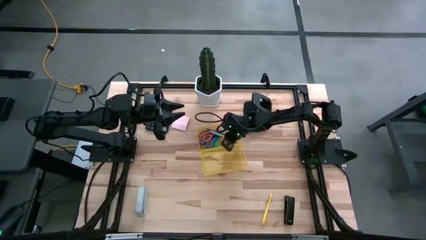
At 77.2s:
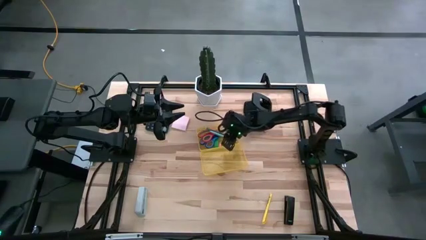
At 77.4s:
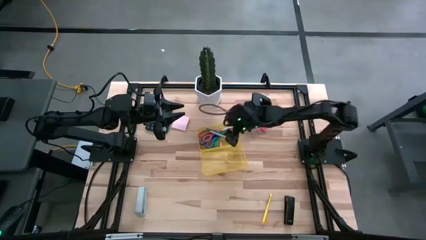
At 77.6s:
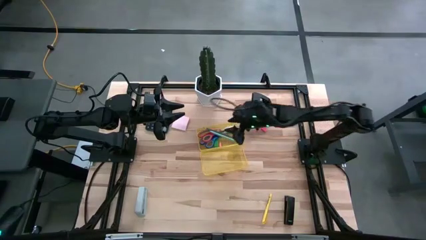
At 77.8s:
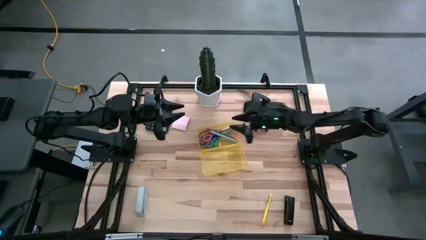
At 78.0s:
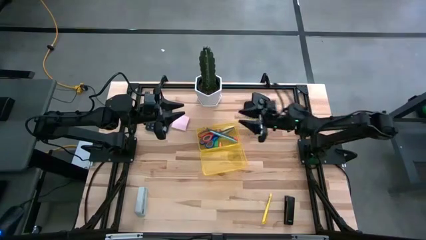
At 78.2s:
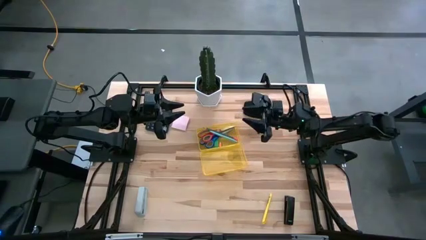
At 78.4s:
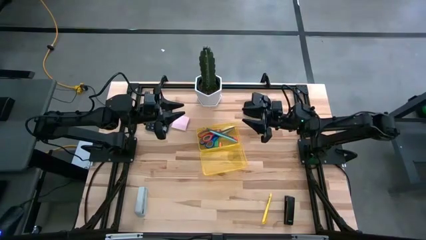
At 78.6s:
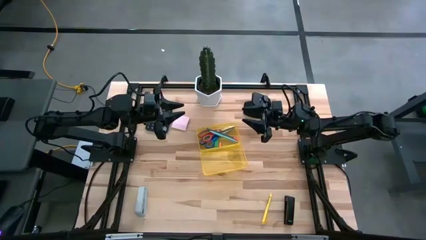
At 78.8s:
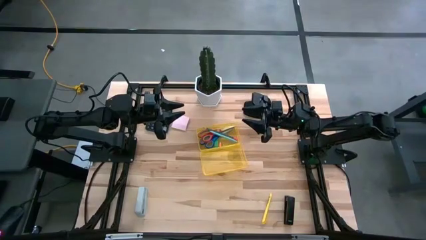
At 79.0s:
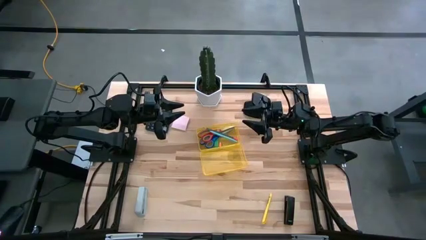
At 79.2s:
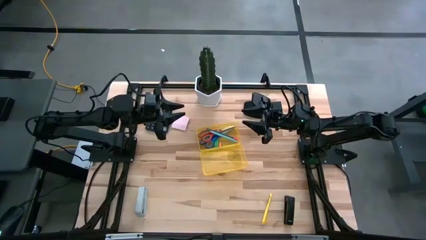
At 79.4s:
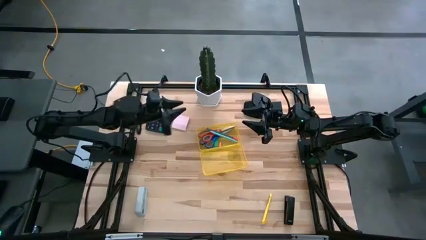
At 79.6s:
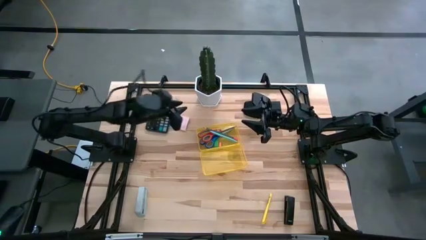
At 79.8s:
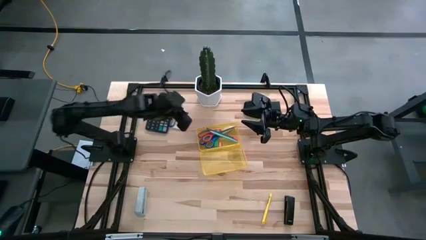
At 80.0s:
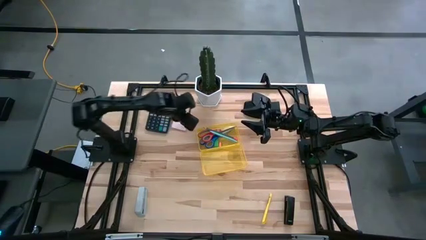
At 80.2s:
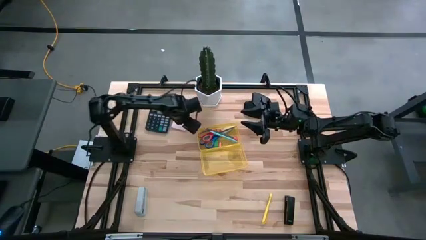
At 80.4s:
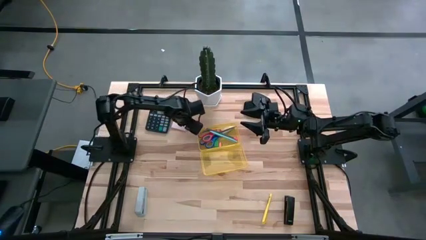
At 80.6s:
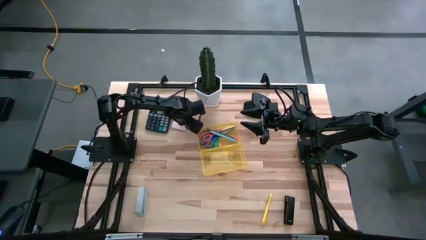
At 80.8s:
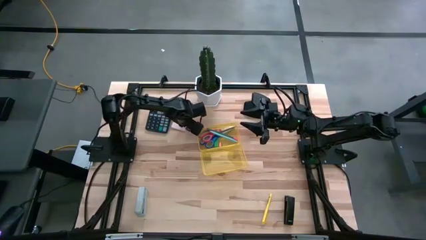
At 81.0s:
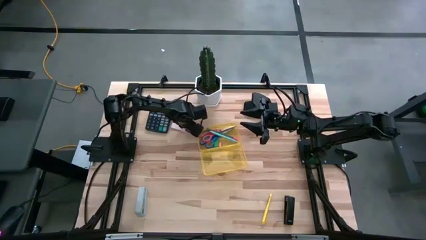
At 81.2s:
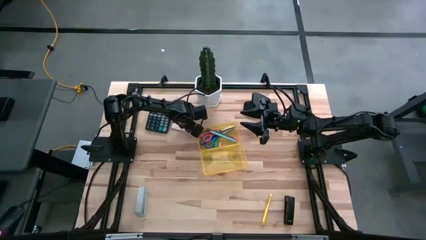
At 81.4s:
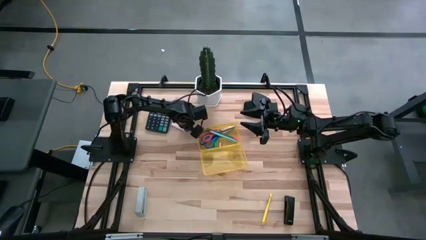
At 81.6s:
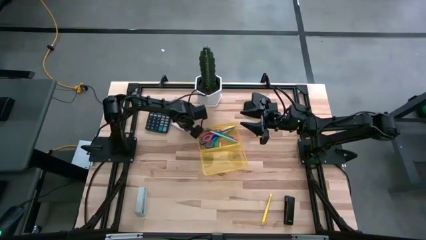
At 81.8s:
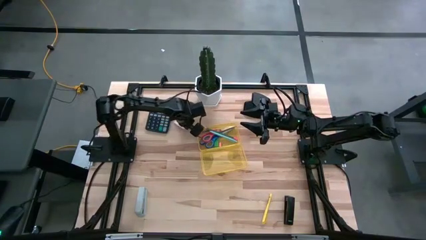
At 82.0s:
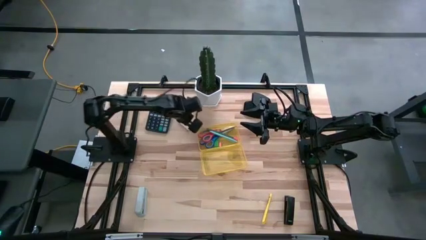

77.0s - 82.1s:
Task: Pack school essentials
Put the pink sticky notes into the yellow supply box

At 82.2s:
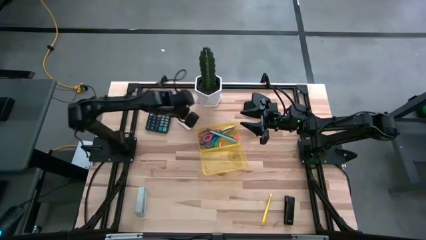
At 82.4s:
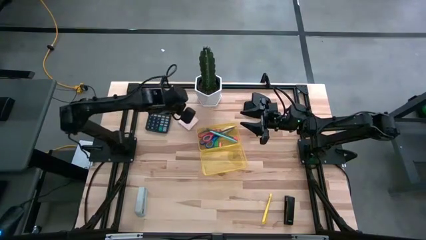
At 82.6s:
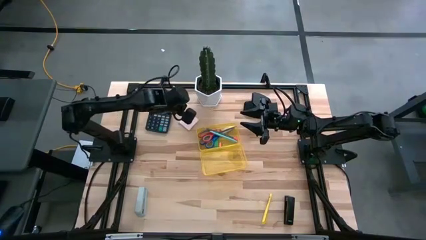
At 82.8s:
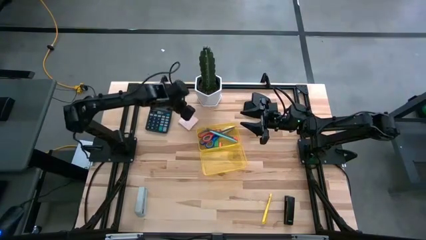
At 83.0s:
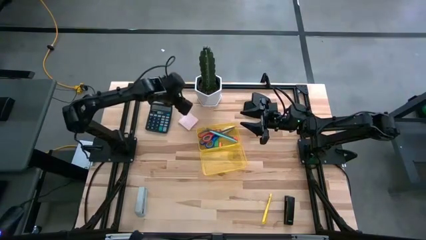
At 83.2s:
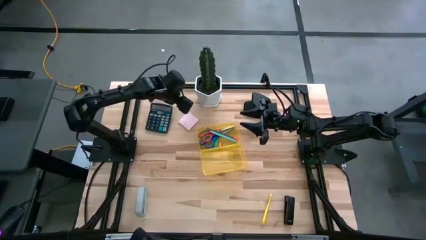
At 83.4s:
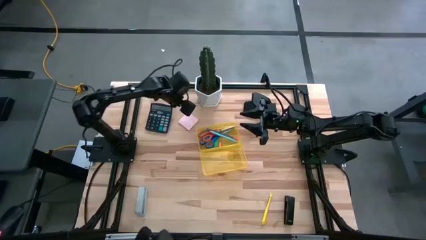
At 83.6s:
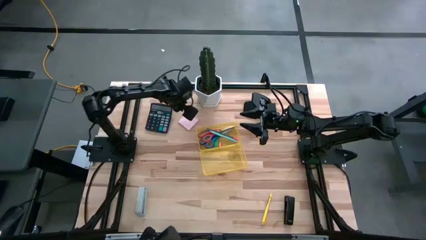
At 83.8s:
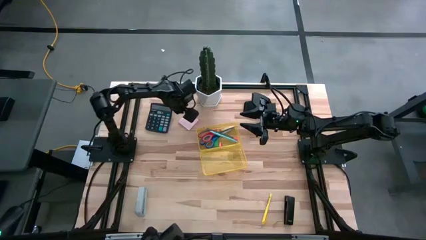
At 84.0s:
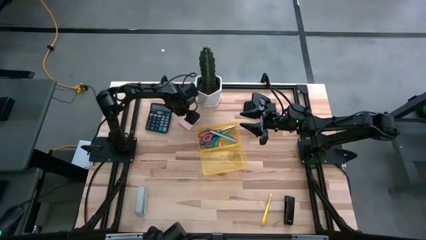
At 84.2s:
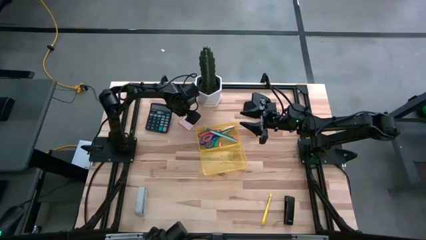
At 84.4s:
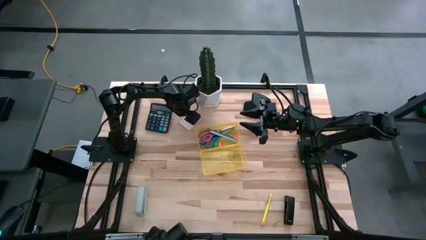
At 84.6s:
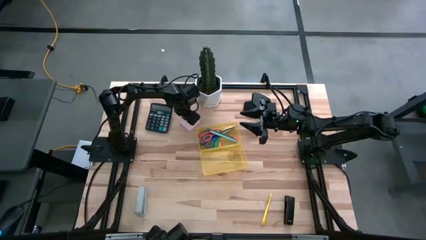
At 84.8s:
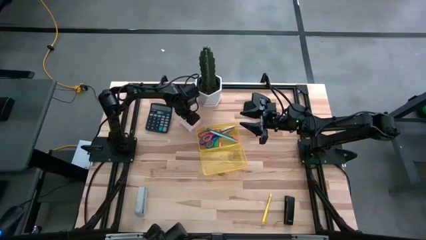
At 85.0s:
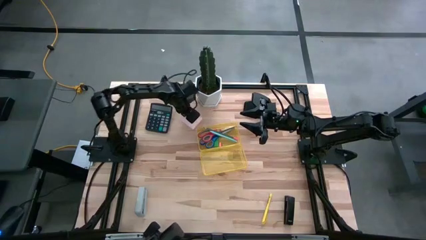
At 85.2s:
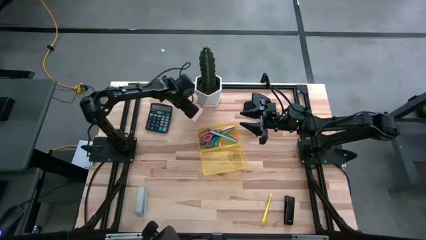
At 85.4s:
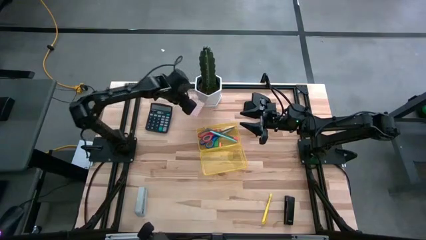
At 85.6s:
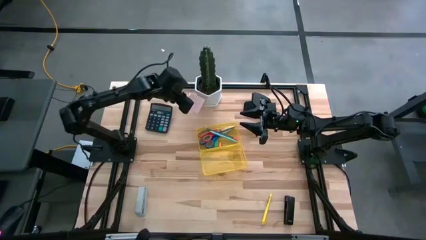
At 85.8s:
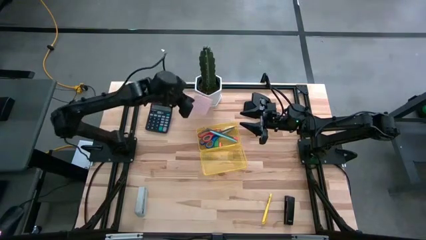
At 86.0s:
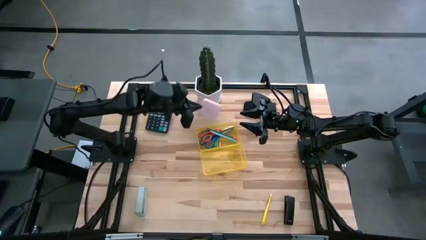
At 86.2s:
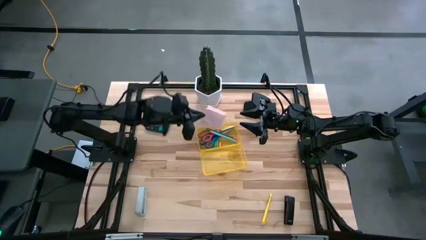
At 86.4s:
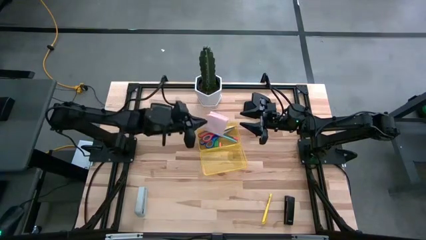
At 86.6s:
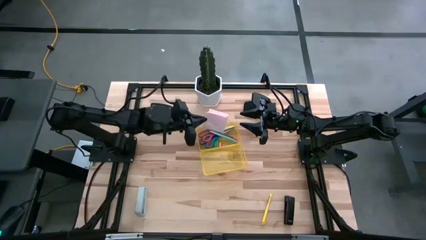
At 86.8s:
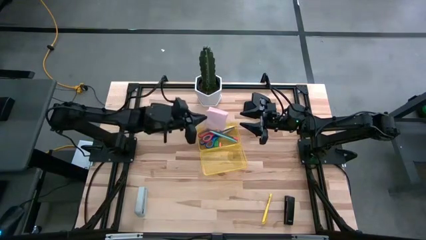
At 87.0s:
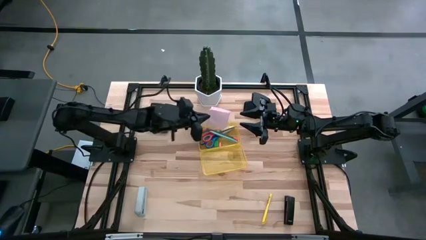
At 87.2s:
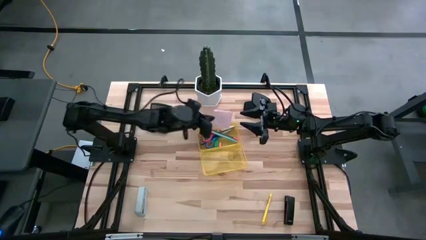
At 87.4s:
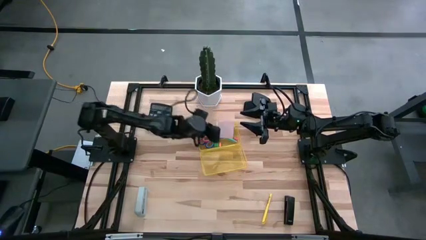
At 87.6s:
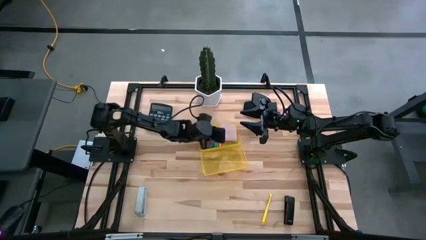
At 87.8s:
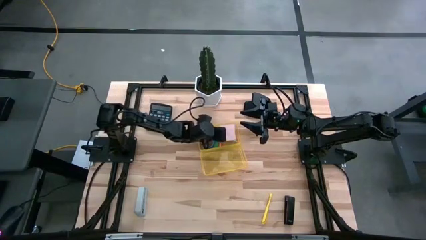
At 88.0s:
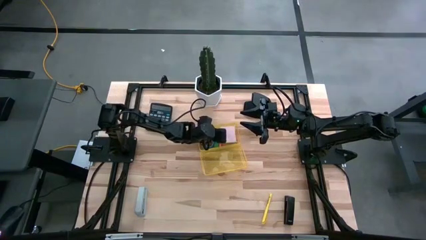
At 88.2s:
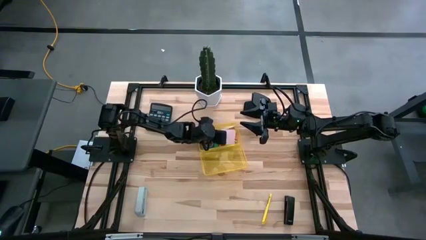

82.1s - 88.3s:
Put the pink sticky notes into the yellow supply box

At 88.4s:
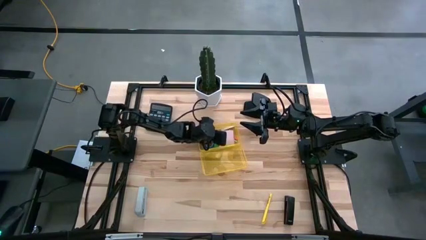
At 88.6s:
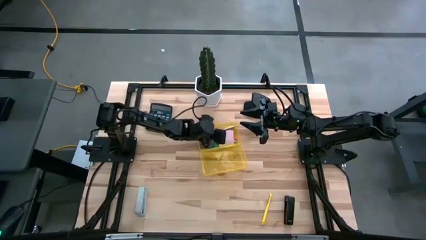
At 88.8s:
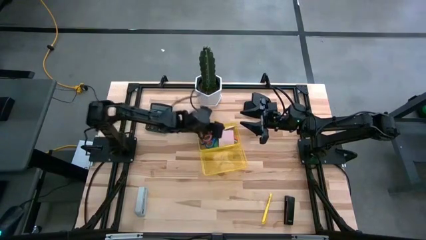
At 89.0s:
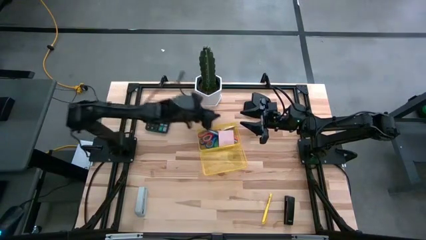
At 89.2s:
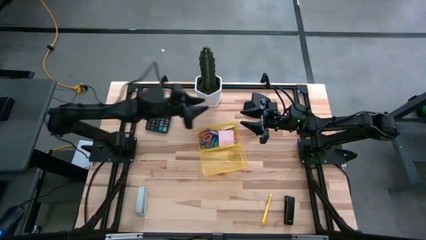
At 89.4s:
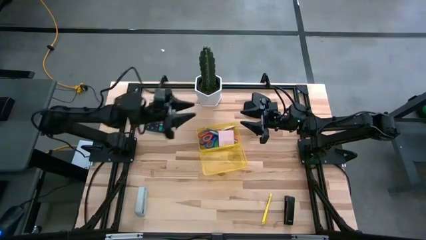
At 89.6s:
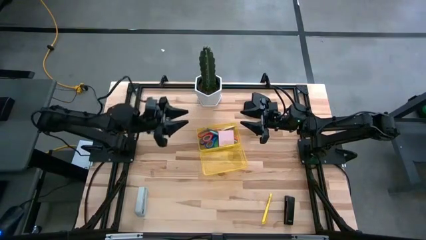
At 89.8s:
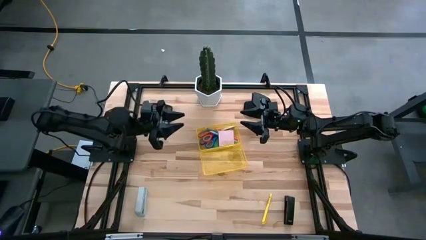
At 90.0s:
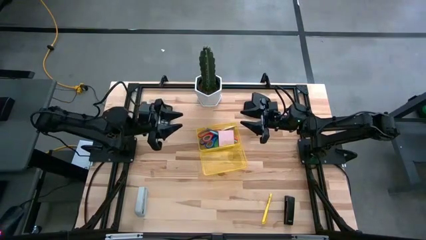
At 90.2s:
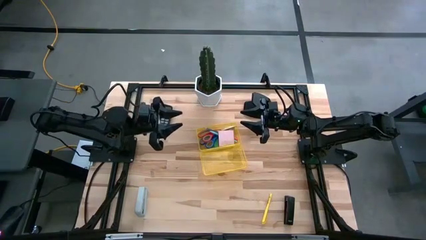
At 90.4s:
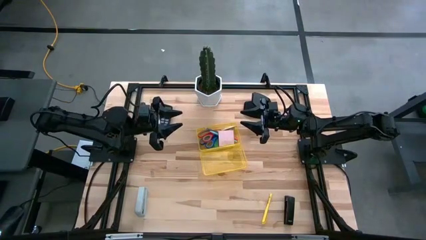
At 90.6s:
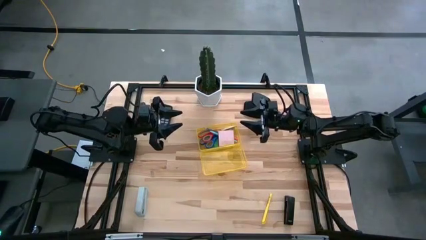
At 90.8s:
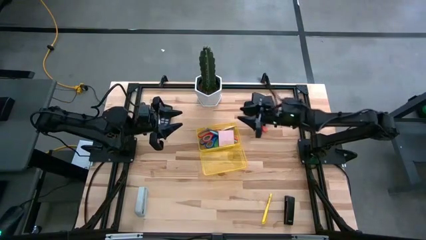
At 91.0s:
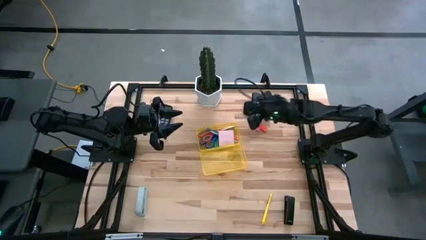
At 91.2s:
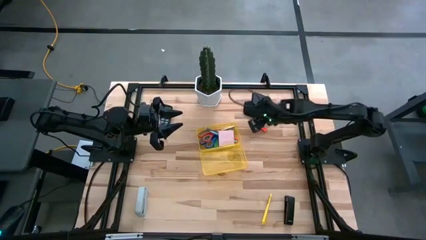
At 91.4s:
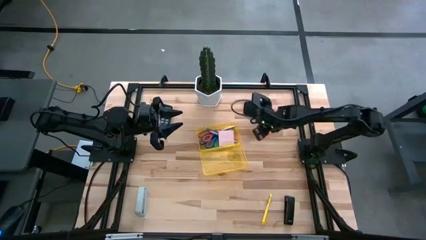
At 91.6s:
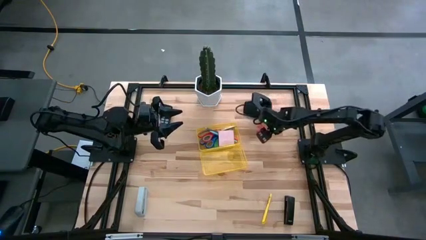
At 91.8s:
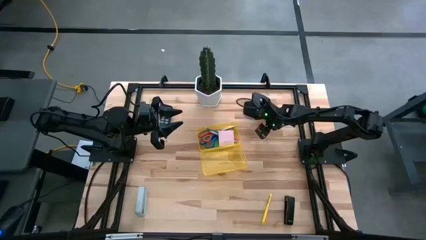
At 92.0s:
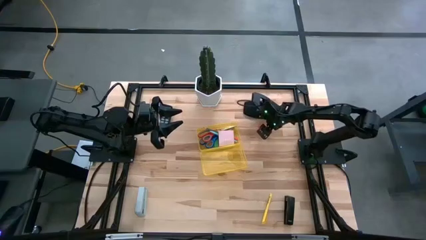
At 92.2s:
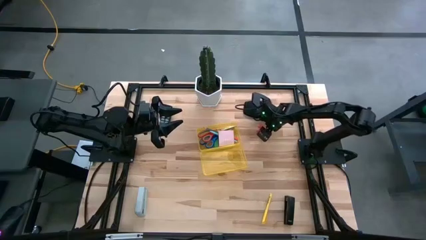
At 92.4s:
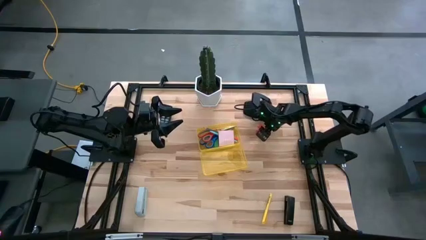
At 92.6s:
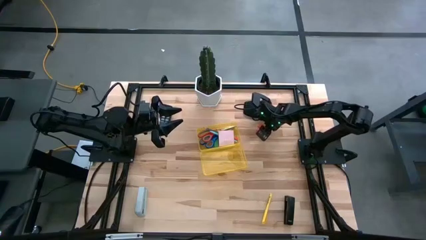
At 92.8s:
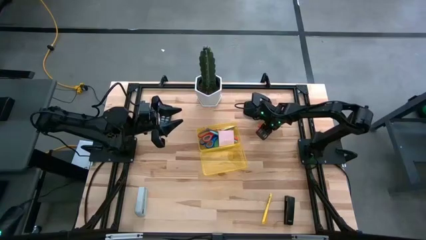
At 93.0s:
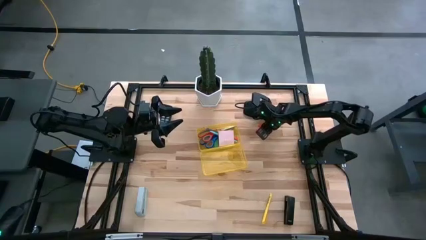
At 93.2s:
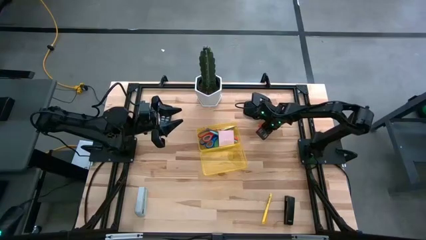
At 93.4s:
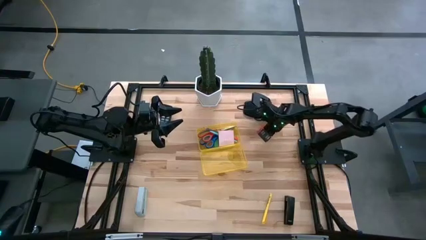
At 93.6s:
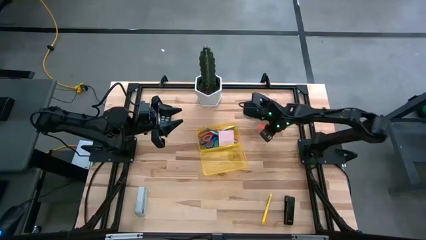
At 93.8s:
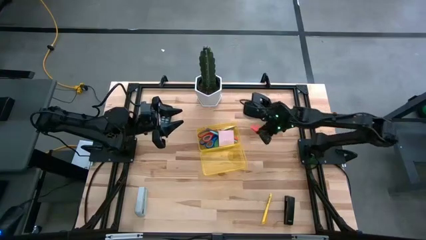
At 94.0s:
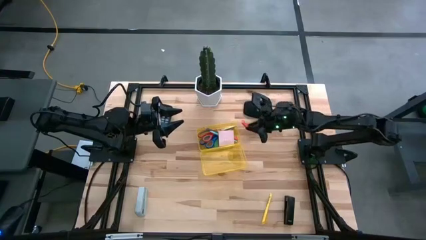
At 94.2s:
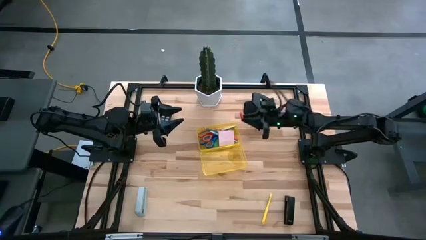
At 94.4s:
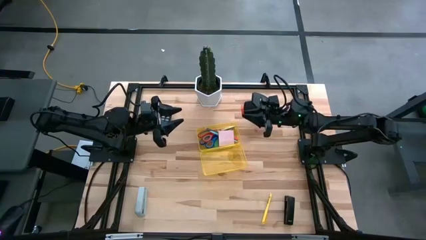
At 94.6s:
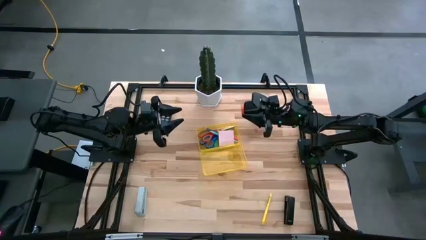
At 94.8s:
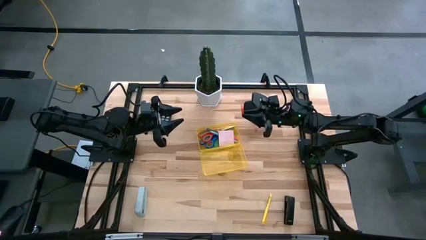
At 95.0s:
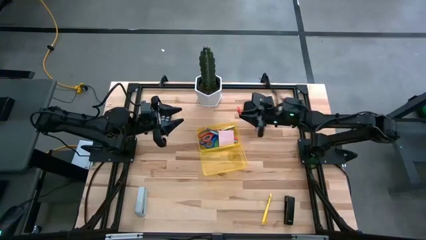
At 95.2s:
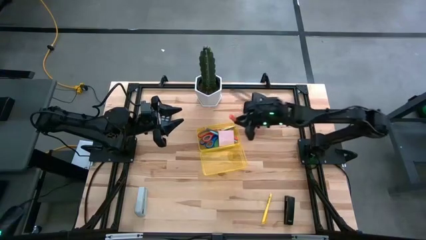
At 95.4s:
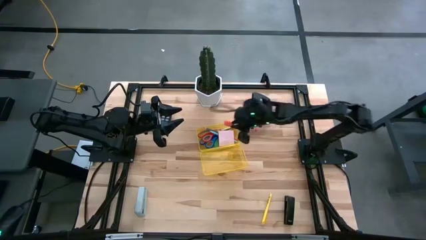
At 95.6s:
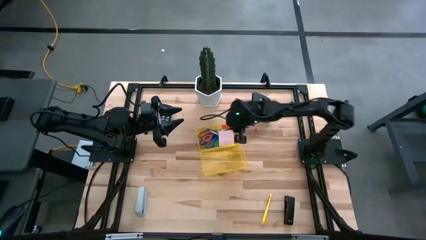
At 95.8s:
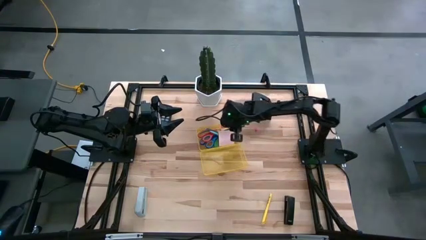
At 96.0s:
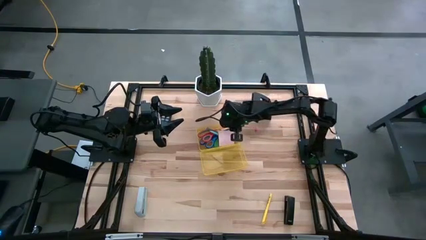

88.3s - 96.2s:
Put the large orange eraser into the yellow supply box
